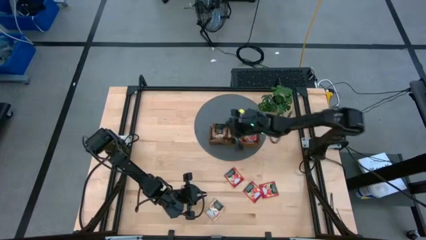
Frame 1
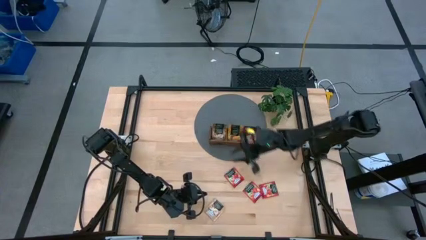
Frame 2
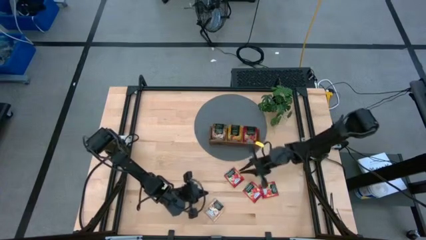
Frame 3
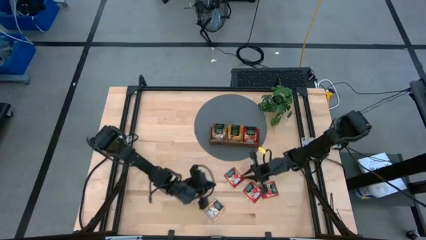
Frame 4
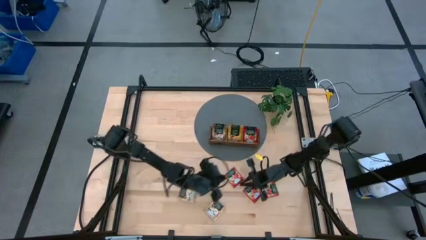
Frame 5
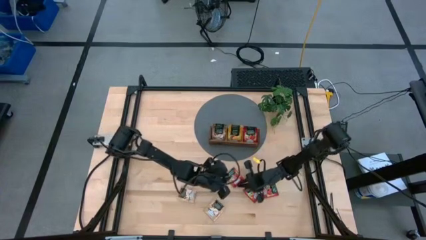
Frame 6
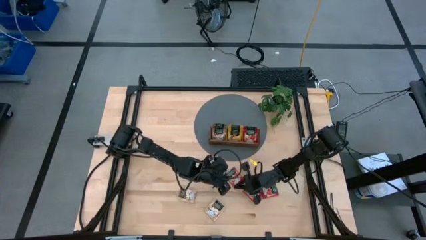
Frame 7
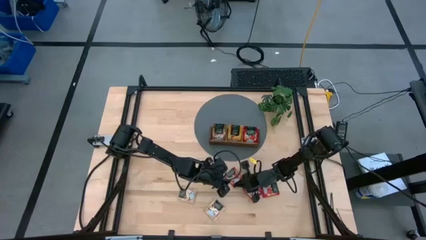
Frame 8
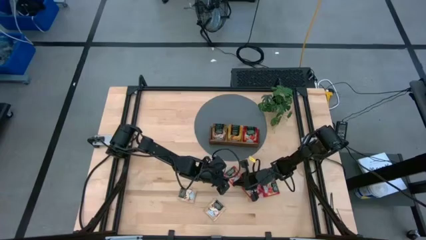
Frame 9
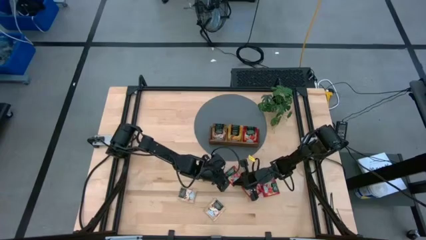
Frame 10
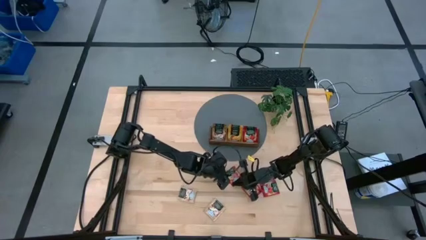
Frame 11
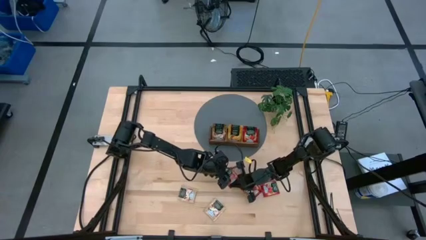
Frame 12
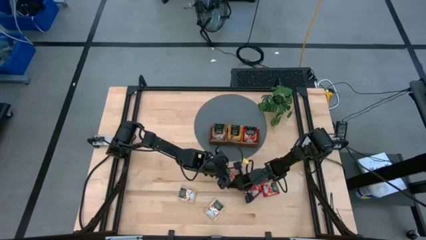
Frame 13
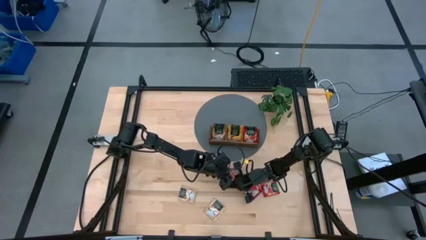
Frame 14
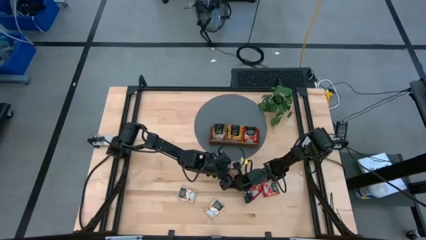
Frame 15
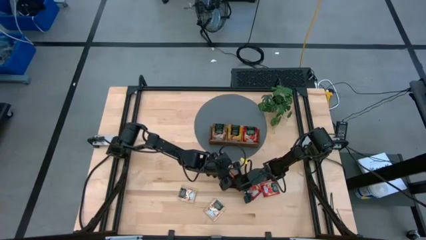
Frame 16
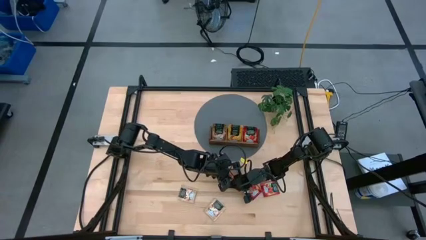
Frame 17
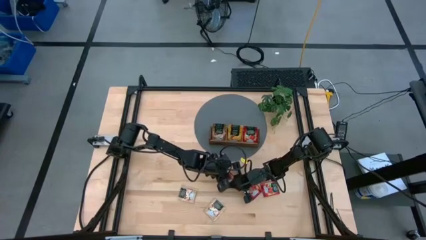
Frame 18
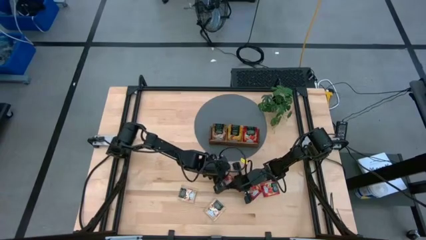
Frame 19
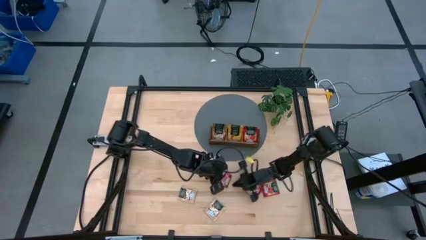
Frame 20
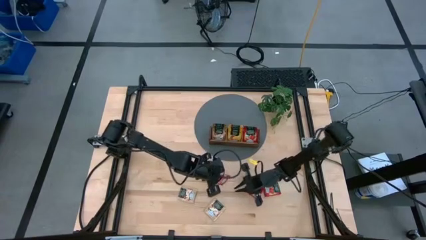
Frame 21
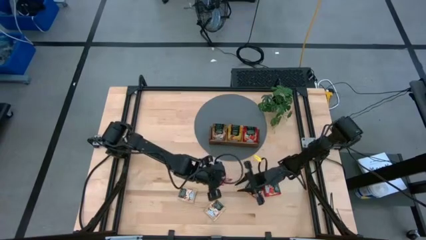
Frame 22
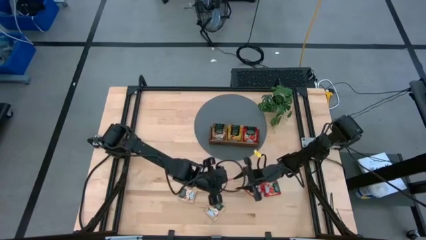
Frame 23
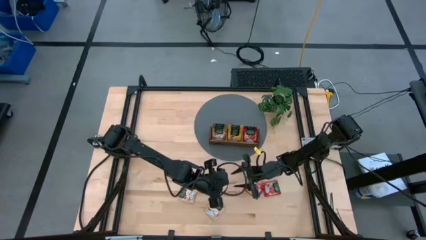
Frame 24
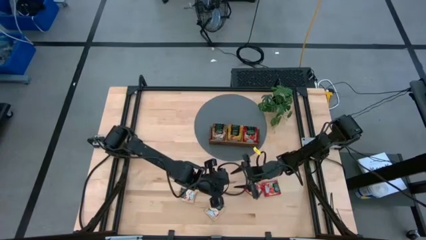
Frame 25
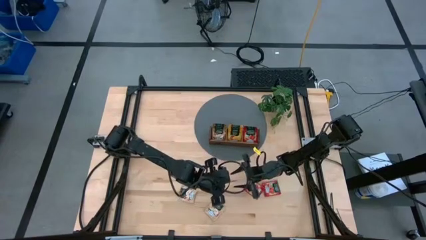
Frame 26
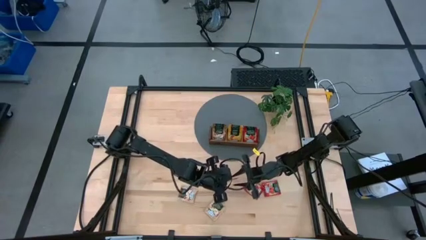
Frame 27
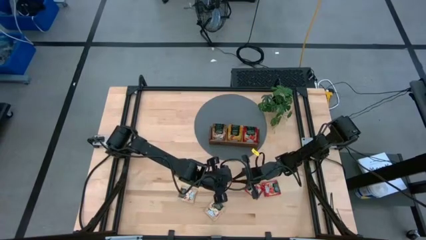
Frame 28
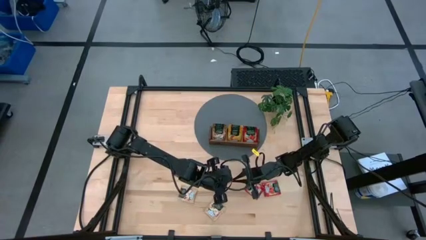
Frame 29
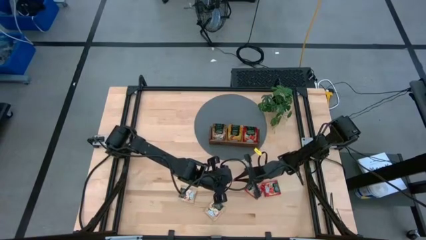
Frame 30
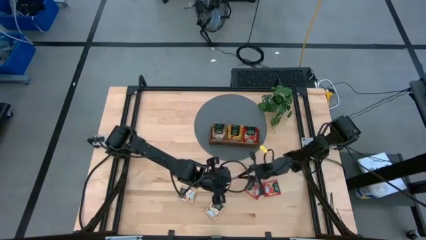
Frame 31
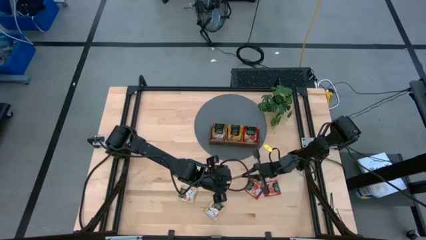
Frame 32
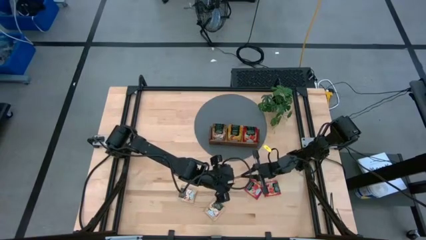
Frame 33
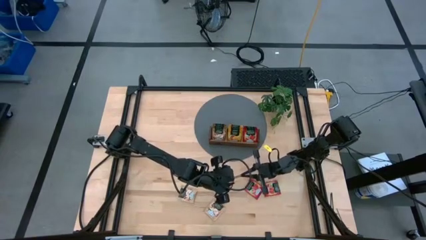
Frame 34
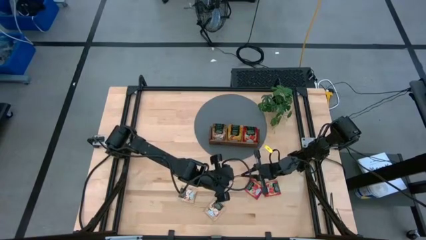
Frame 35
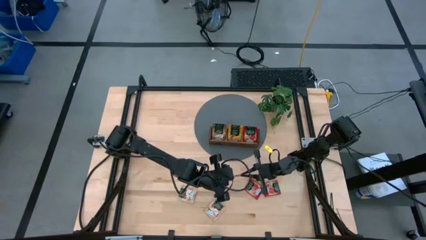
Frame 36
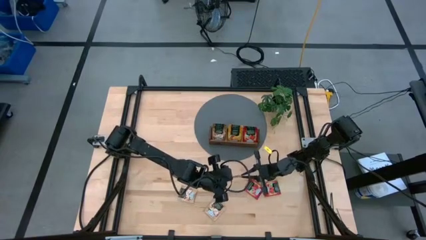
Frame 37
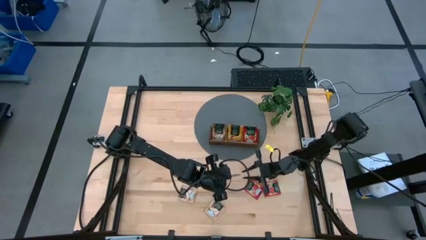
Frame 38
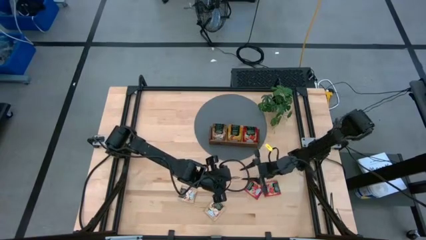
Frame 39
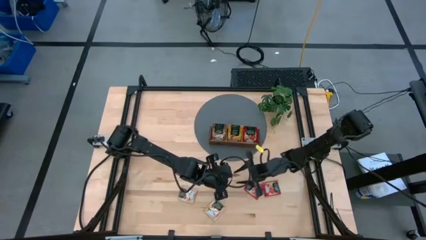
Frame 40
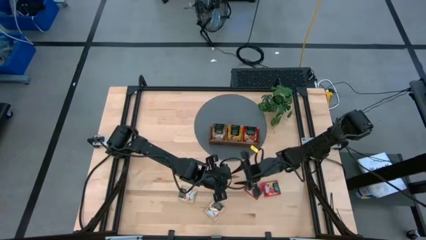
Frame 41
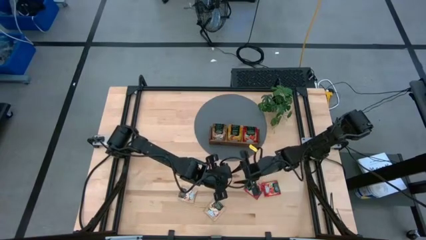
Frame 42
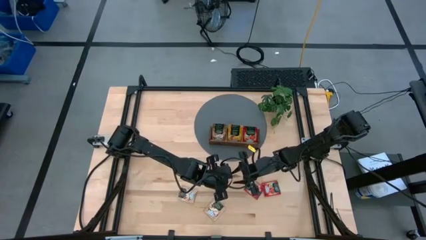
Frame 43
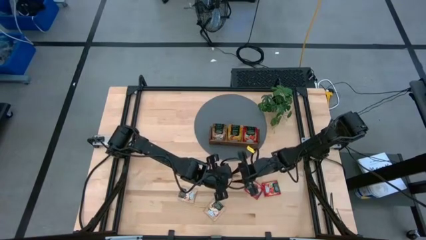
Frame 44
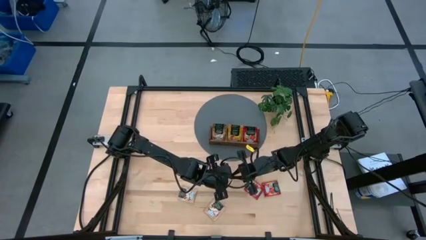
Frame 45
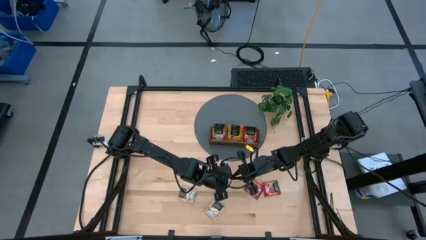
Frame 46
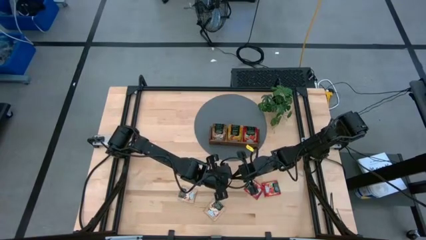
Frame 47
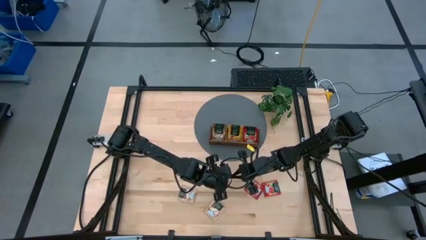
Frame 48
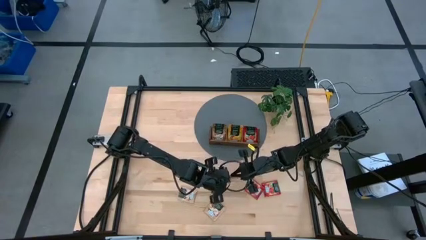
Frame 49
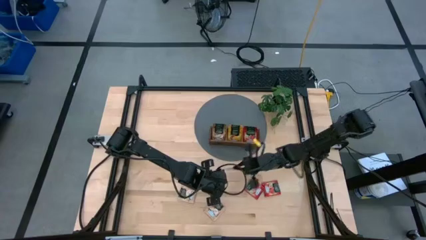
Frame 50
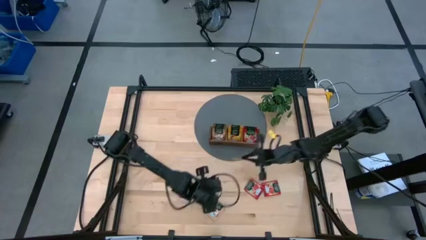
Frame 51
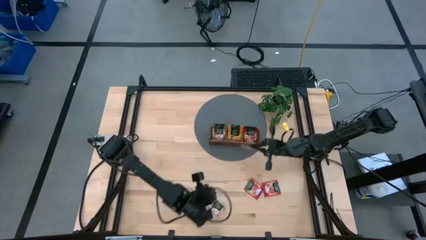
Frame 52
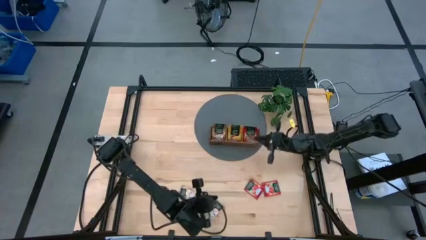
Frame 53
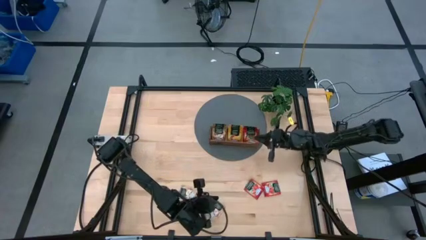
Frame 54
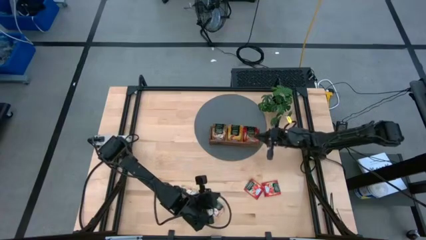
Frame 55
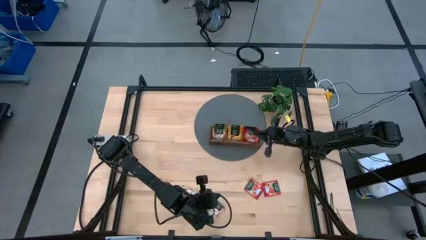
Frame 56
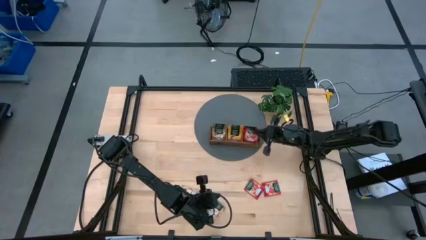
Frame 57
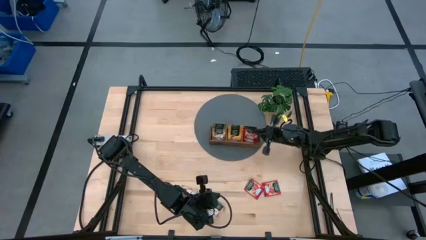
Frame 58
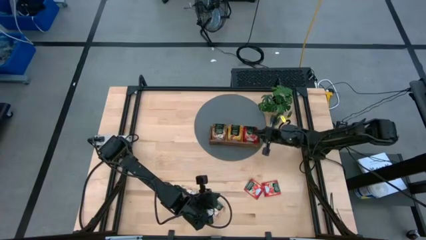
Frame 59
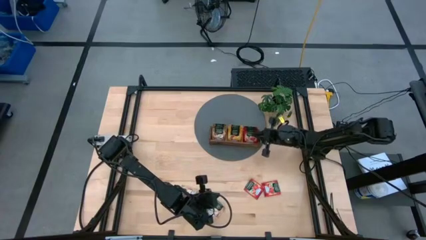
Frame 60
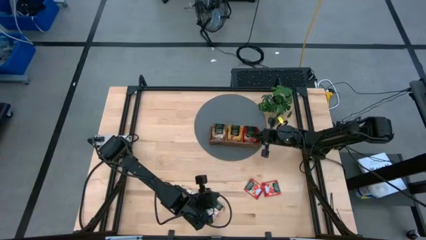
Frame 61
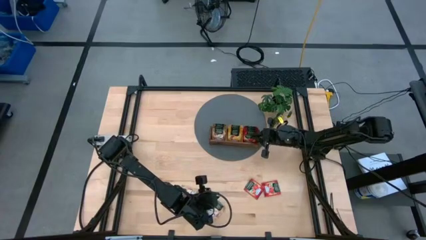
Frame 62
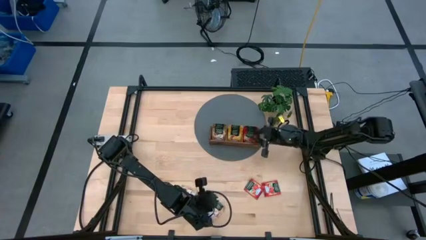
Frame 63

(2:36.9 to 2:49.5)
Task: Pick & Place Tea
Put the red tea bag into the right section of the wooden organizer

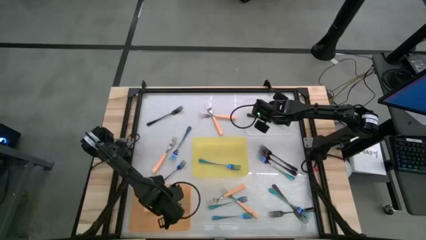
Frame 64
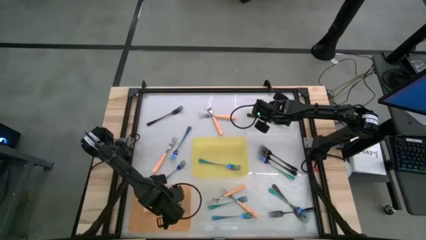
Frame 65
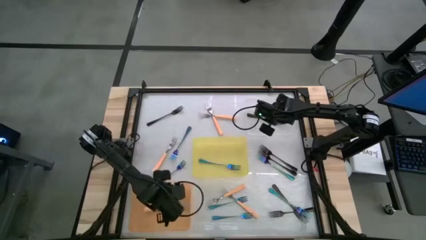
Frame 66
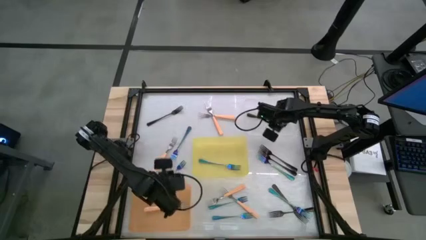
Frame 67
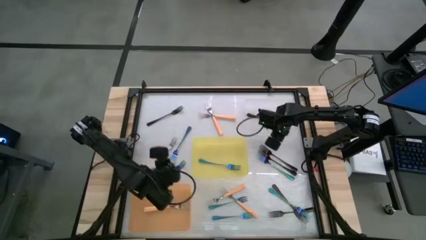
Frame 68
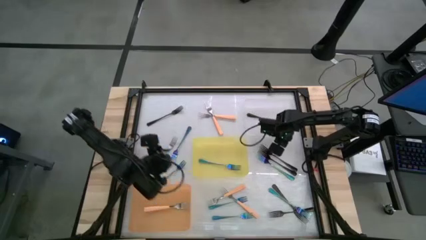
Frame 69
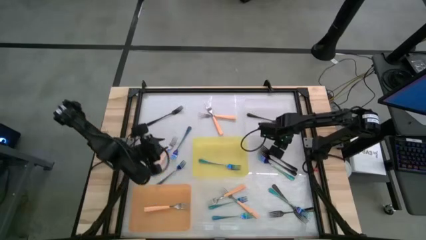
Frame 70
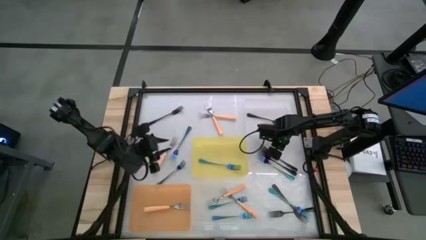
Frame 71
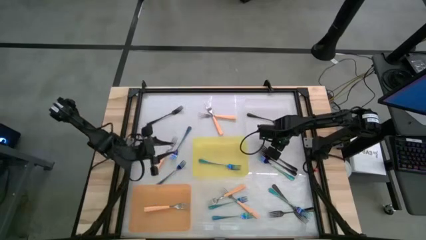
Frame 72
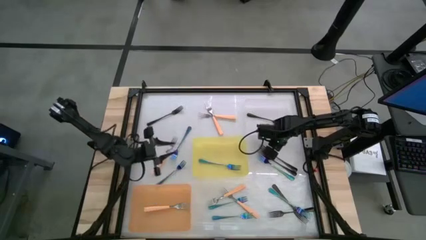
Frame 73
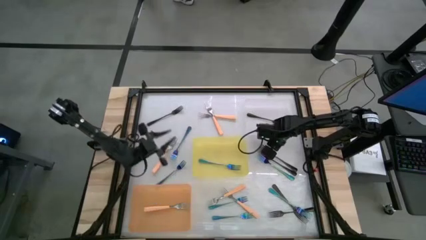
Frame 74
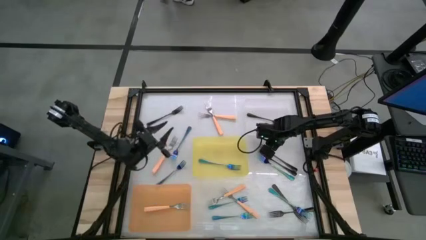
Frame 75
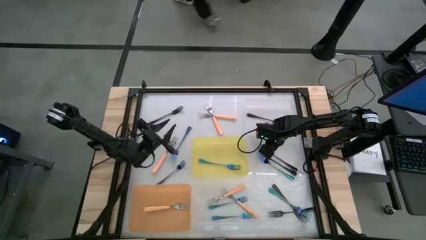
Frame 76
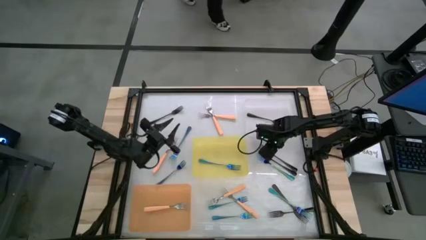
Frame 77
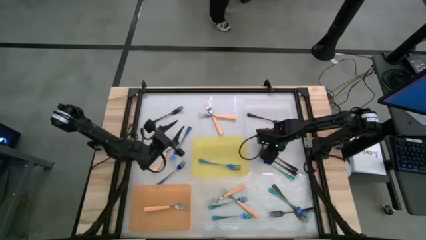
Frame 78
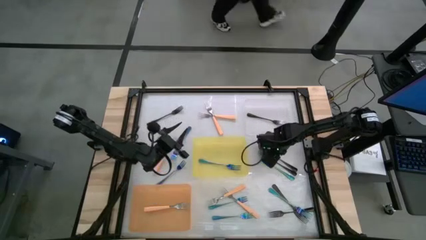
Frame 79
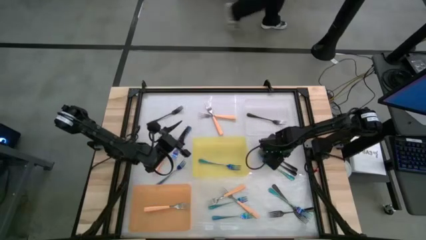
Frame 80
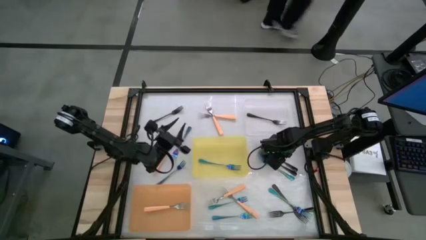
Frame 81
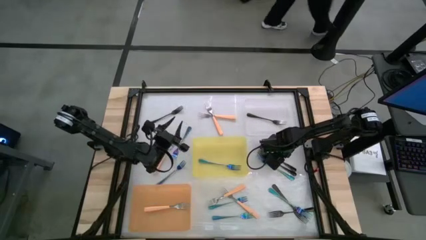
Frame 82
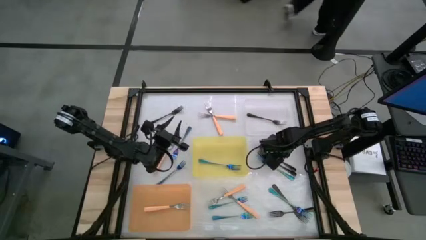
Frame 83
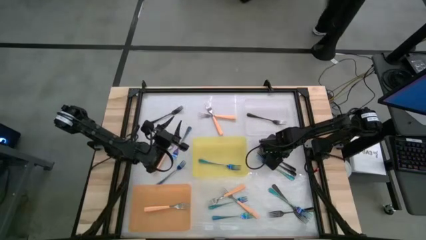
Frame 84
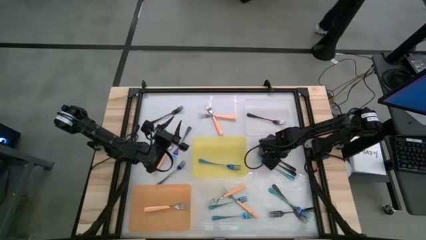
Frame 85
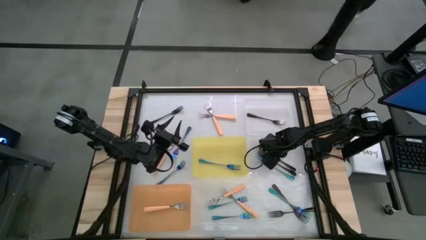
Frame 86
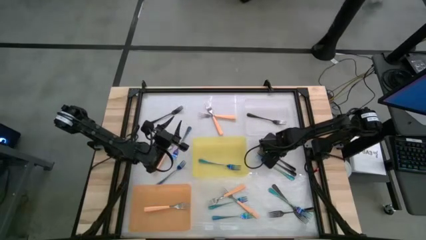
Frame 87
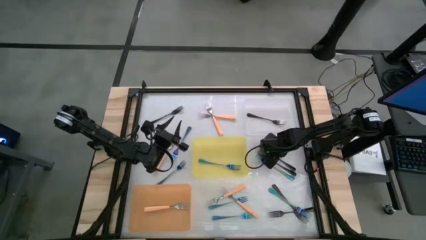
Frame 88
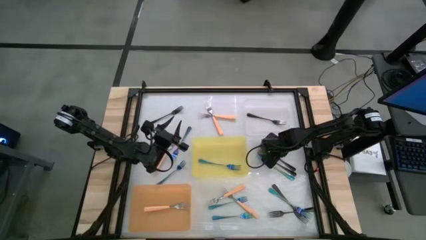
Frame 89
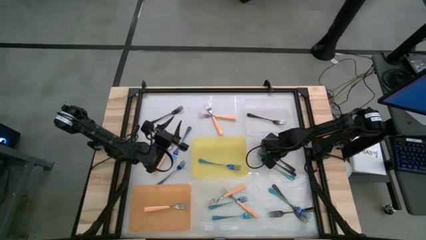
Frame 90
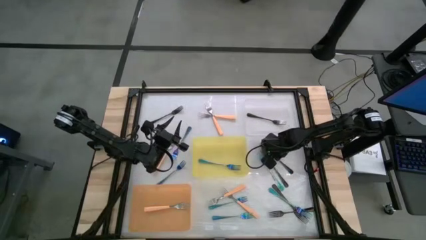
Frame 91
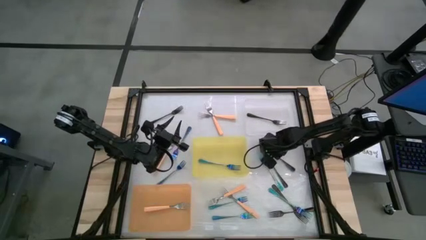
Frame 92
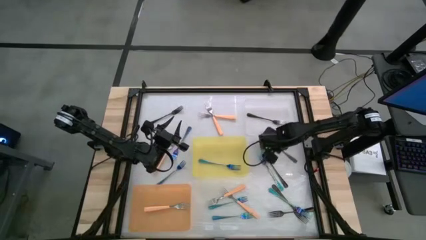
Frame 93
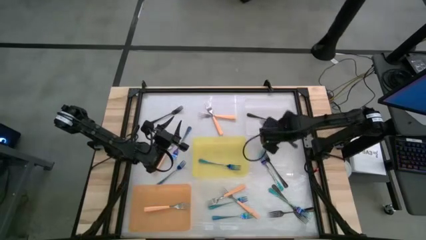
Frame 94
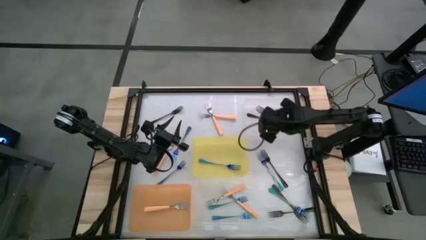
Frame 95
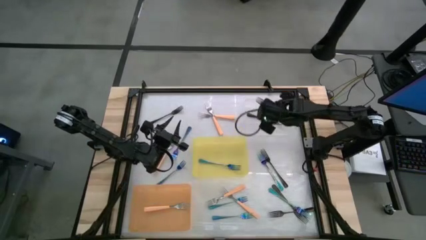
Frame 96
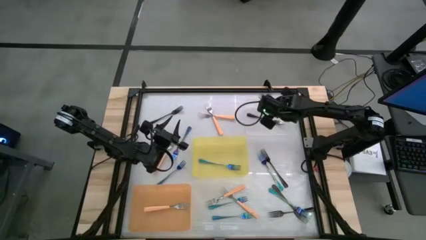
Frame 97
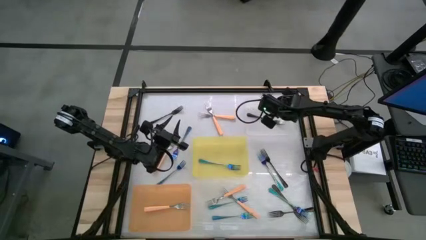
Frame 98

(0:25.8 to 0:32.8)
Task: Sort silverware by color (type)
Put the black fork into the transparent bin
